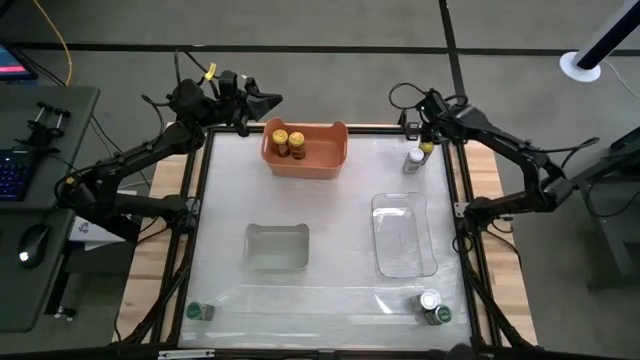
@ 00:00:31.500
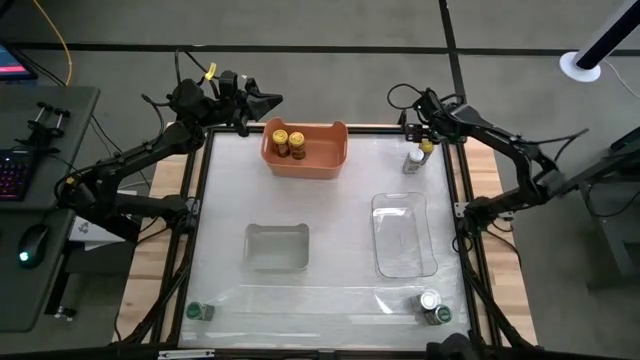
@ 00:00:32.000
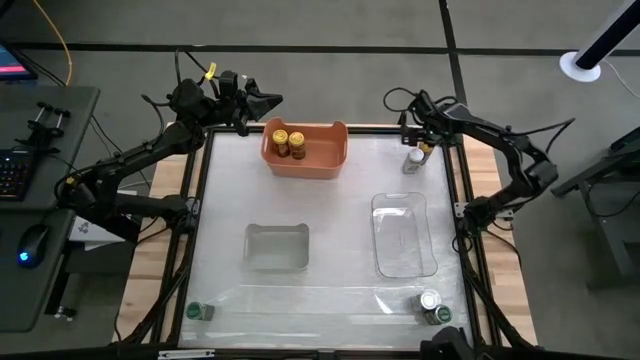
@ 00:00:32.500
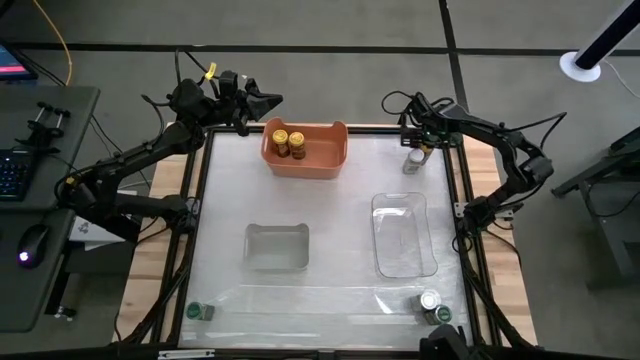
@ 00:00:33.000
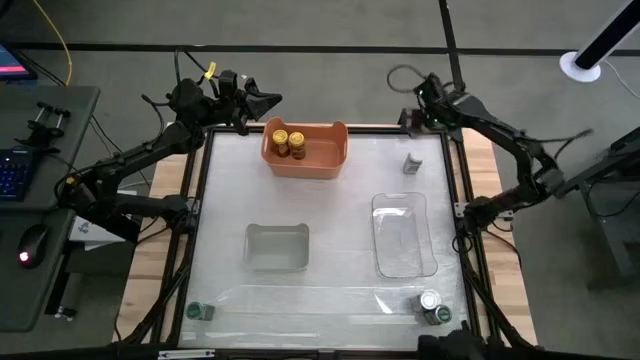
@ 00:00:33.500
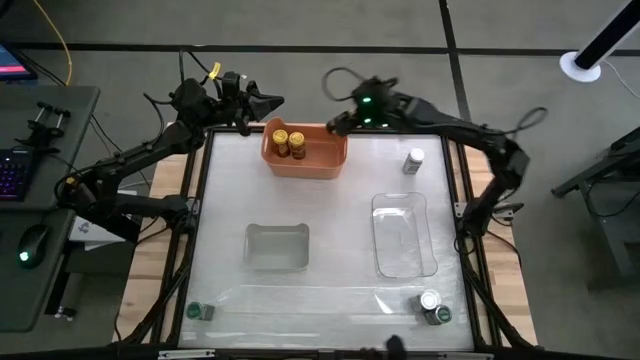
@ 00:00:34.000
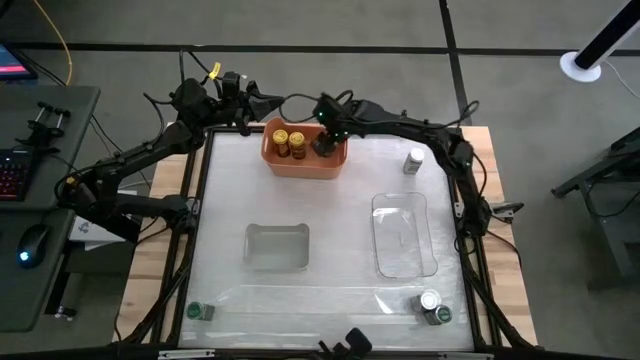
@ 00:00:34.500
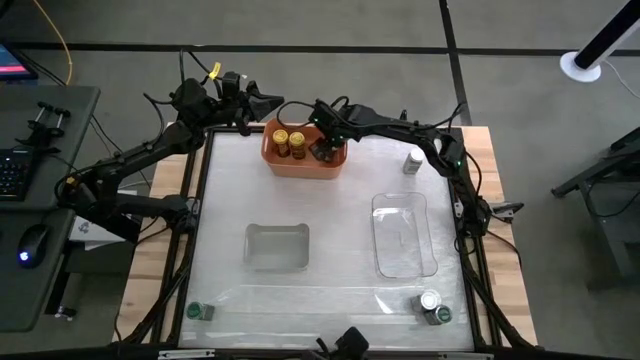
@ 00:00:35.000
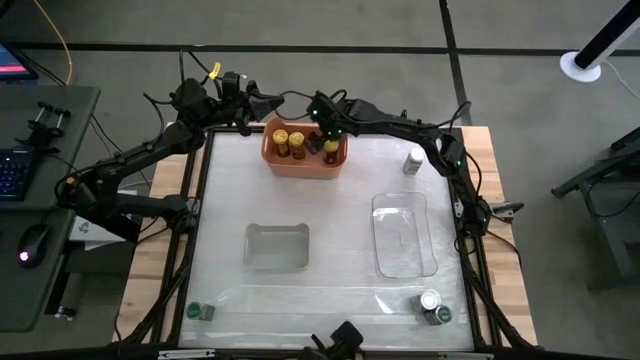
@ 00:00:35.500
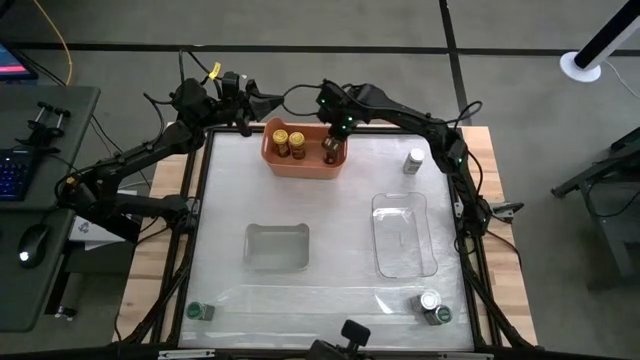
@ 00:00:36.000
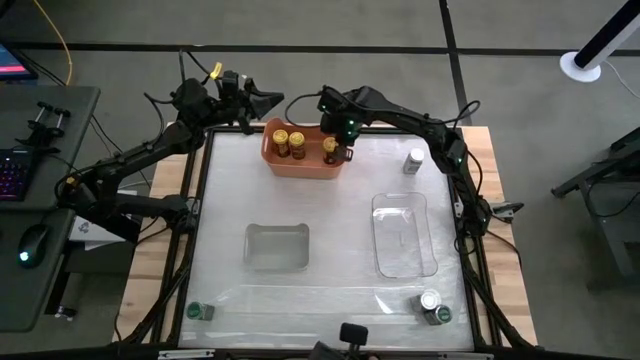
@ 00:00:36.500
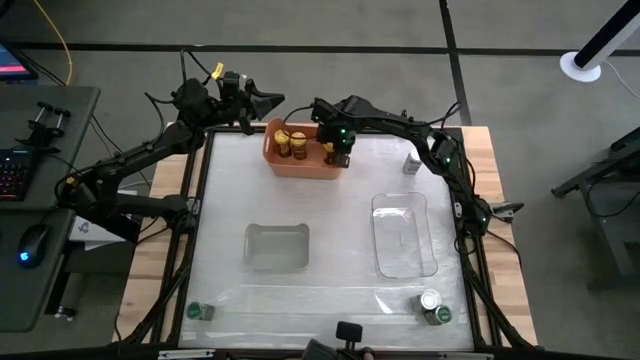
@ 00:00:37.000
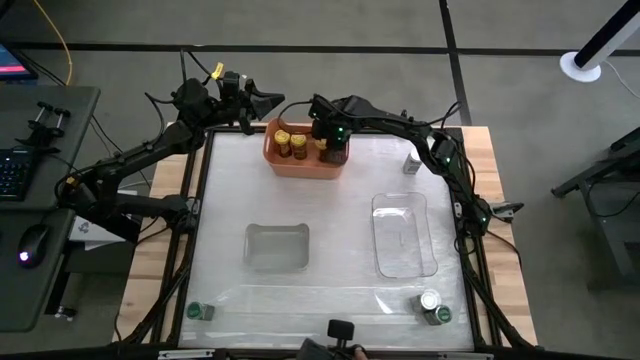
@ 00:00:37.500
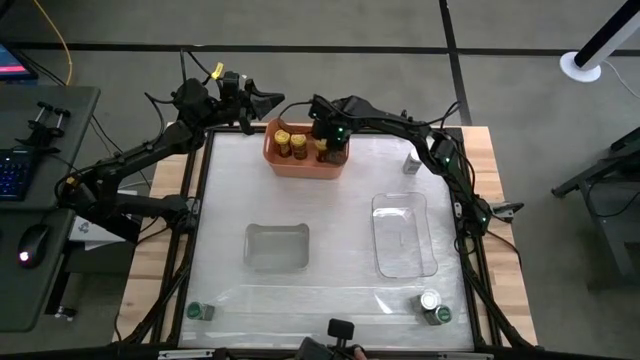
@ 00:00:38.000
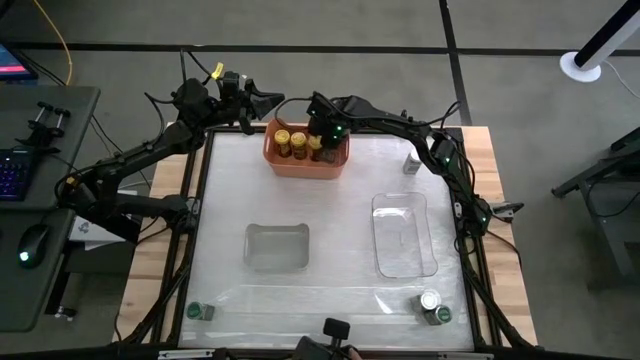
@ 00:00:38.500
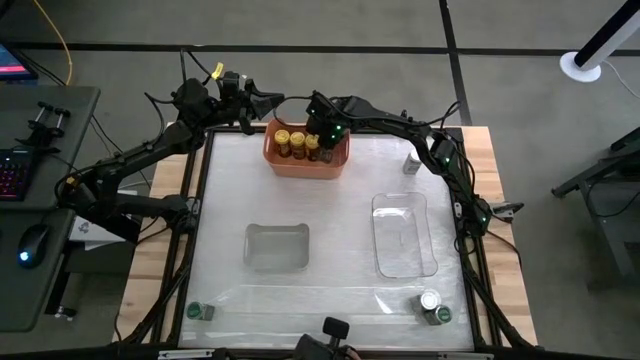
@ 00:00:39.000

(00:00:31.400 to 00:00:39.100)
Task: Sort spices by type
Put the yellow seasoning bottle into the orange bin

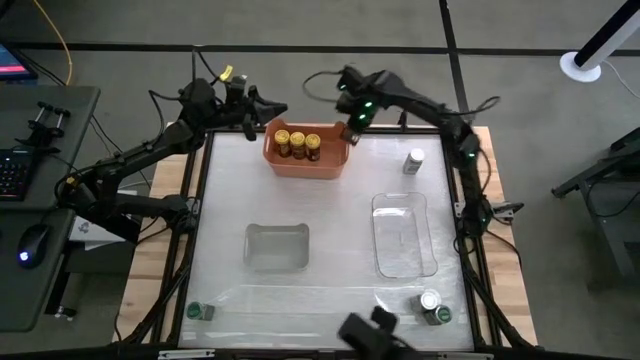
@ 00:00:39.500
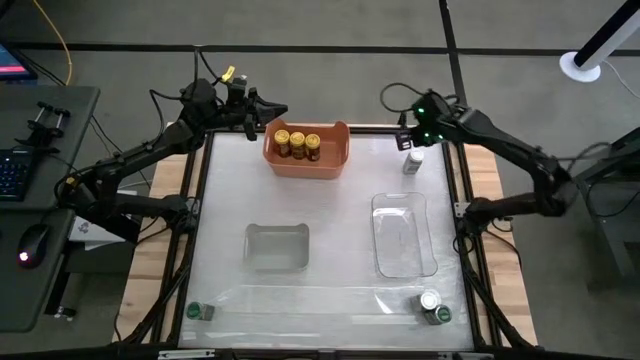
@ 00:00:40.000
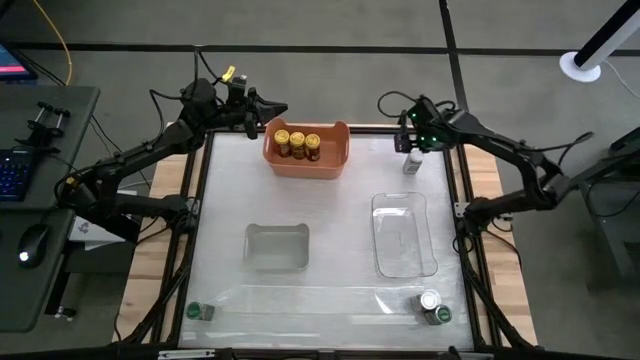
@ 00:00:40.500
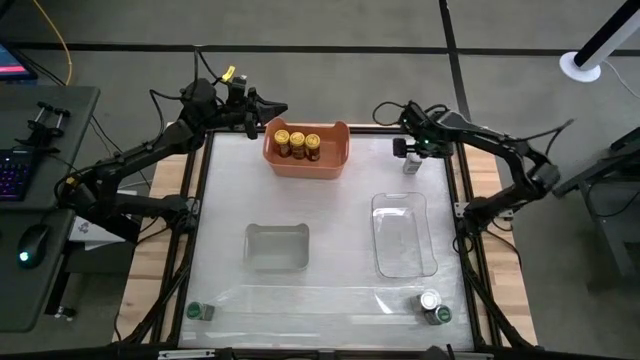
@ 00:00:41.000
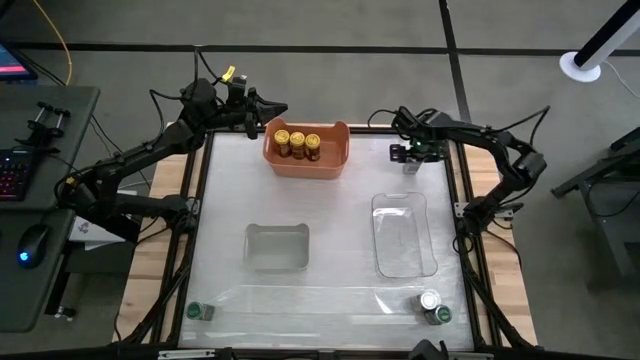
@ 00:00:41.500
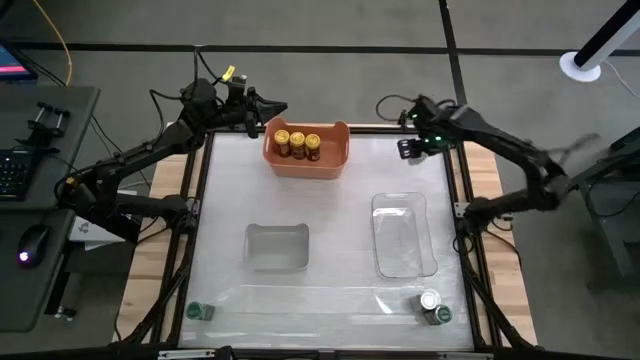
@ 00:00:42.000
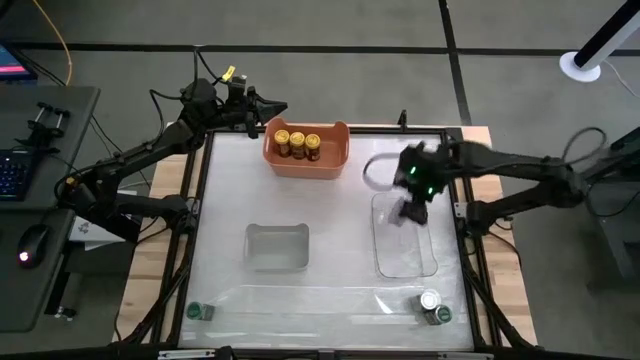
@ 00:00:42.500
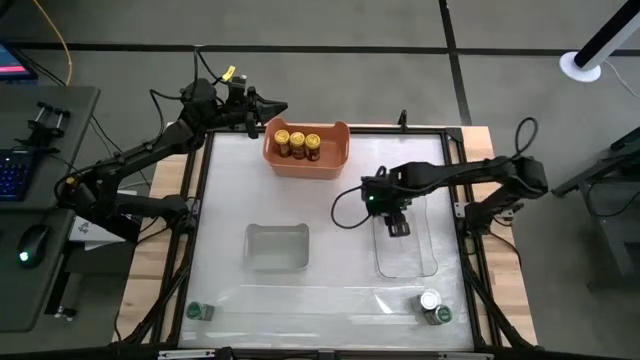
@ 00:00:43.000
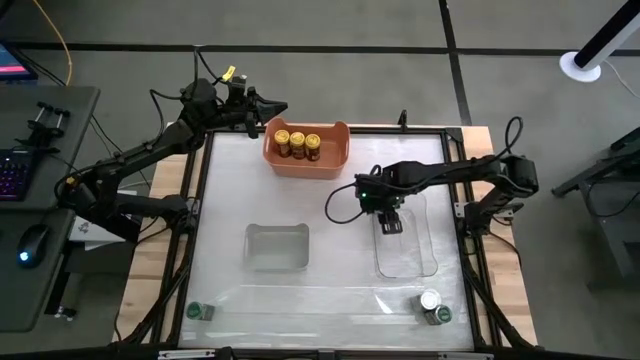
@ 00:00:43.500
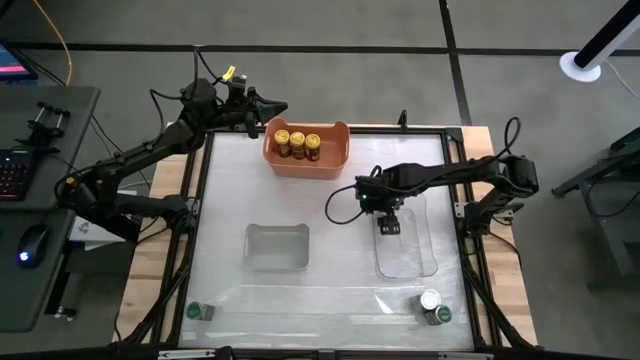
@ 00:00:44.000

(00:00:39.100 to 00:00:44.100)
Put the top right white seasoning bottle into the transparent bin

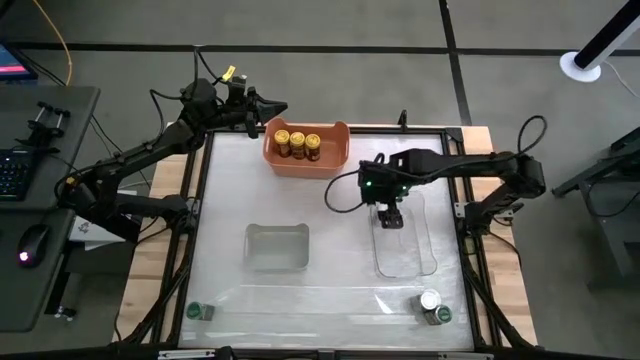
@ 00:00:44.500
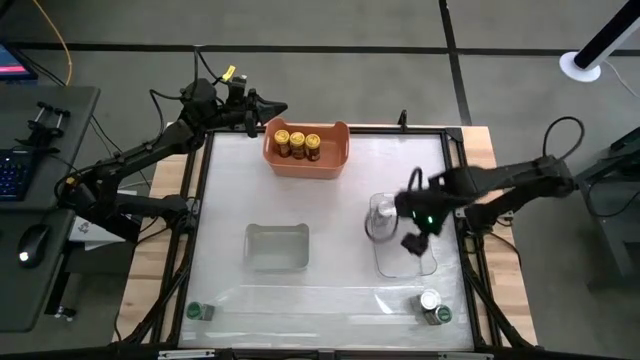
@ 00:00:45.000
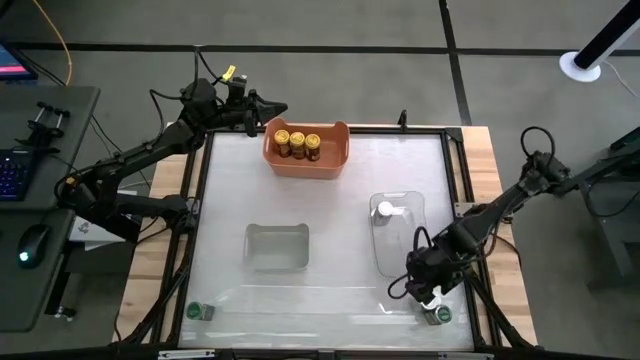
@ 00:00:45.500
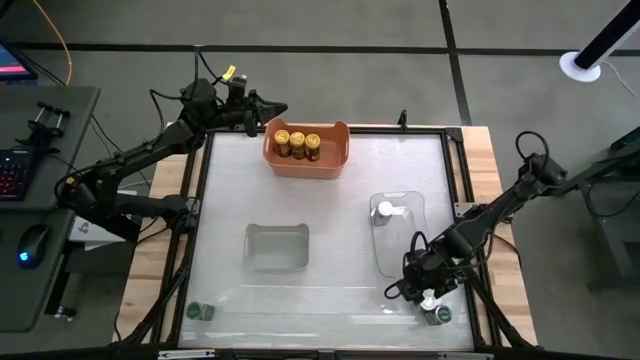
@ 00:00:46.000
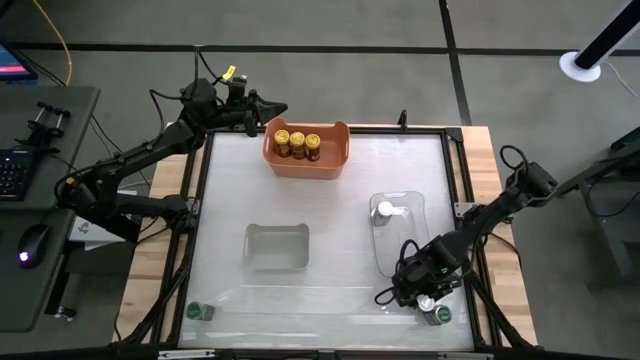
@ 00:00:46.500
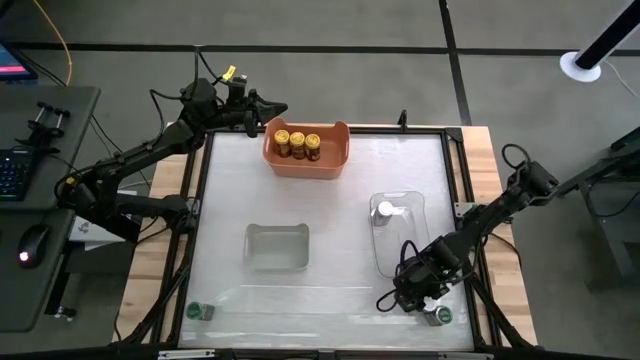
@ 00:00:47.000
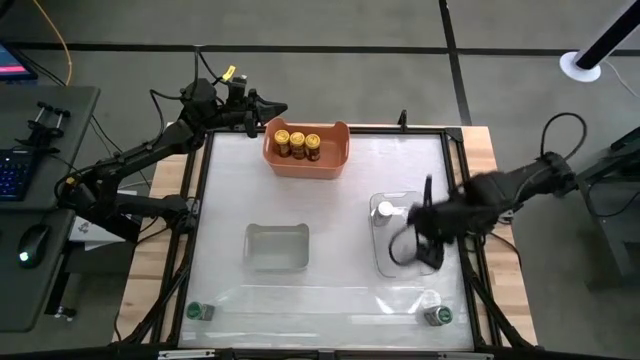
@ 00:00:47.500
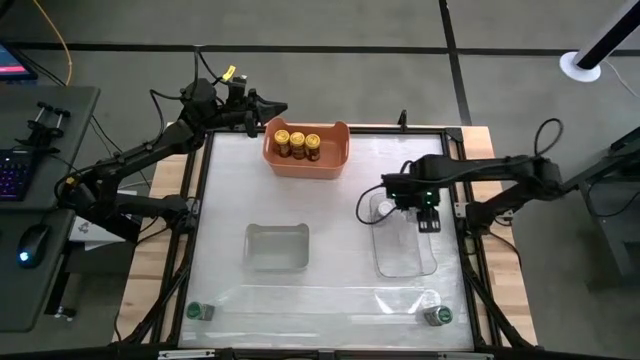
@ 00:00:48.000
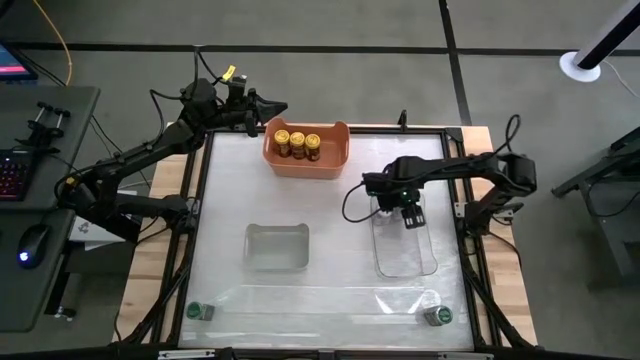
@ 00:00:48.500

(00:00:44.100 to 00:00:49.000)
Put the white seasoning bottle into the transparent bin

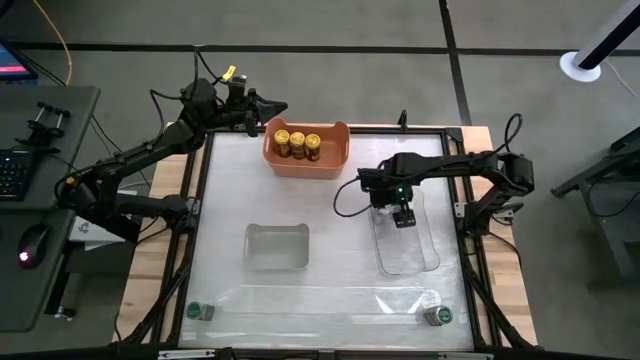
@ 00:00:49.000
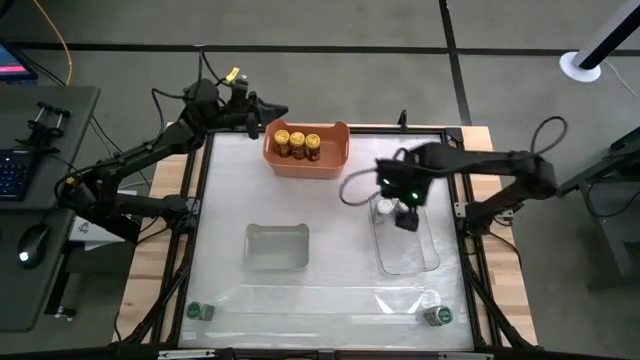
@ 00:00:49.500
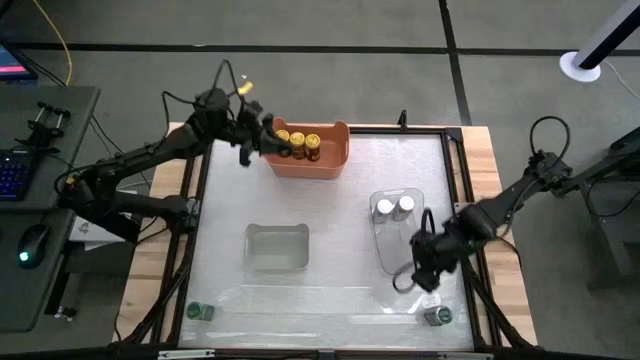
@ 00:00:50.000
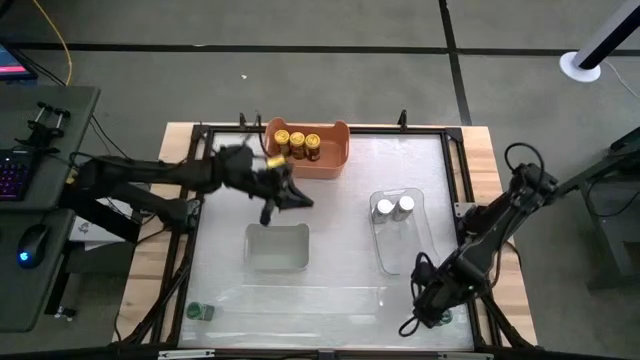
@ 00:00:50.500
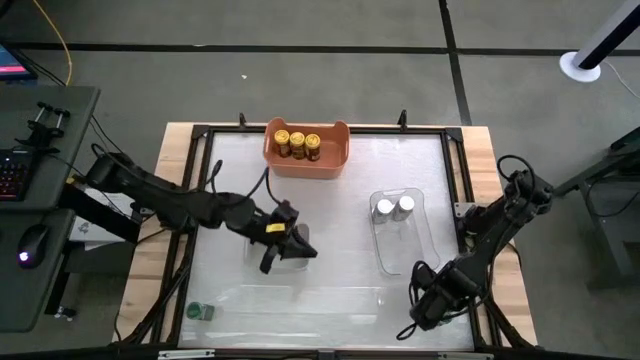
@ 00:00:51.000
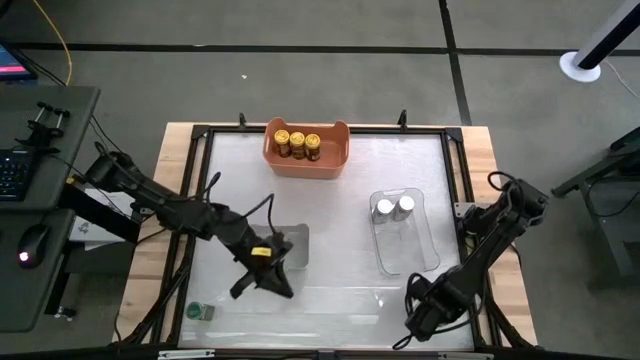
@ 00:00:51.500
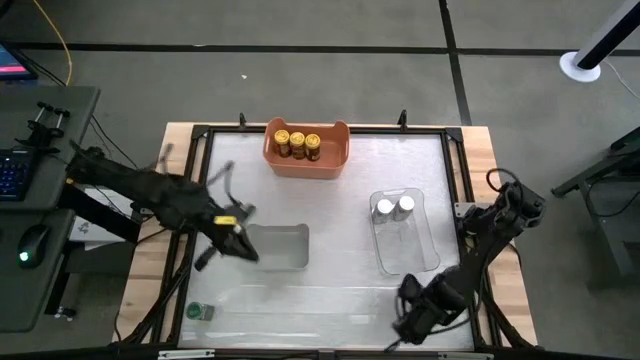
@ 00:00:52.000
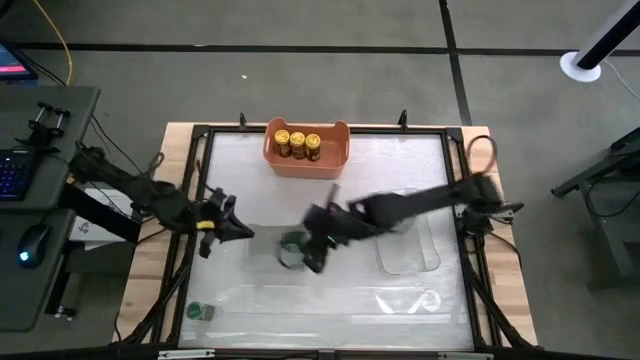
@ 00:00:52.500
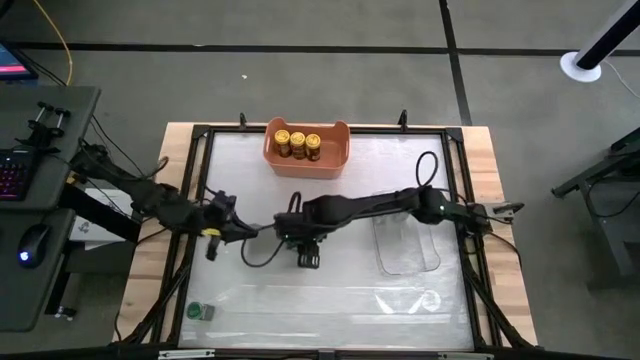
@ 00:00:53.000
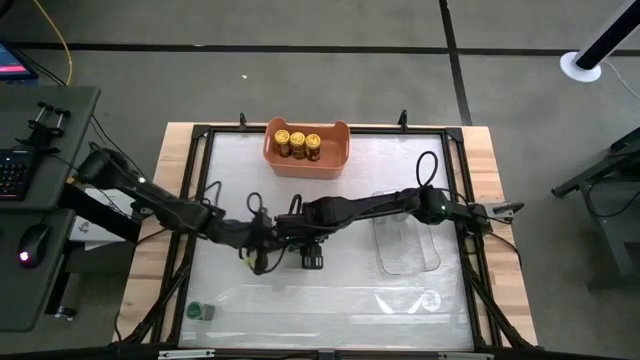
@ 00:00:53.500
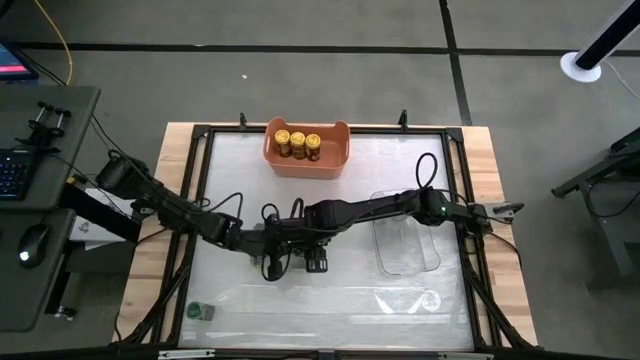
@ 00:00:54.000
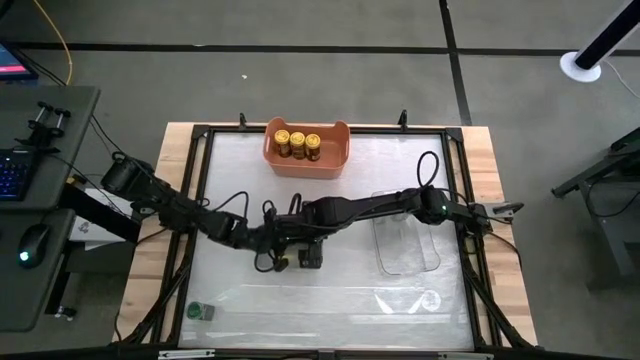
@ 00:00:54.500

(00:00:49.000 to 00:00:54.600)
Put the right green seasoning bottle into the gray bin
